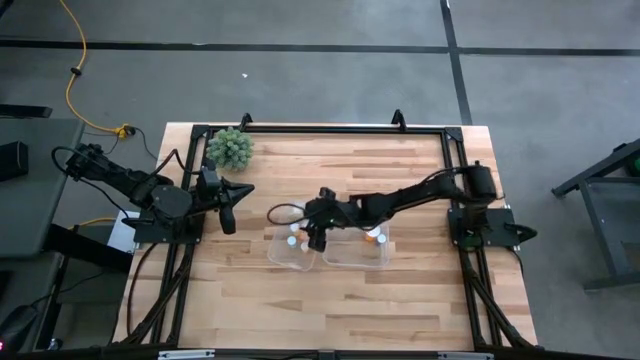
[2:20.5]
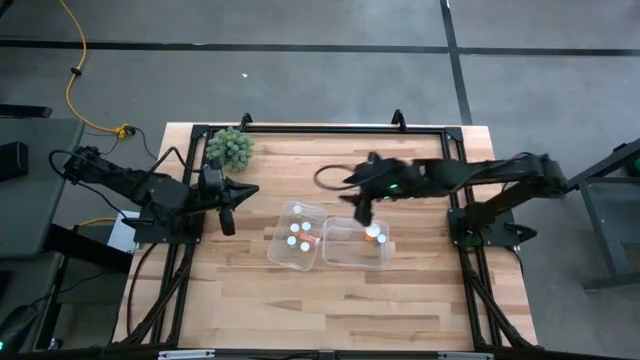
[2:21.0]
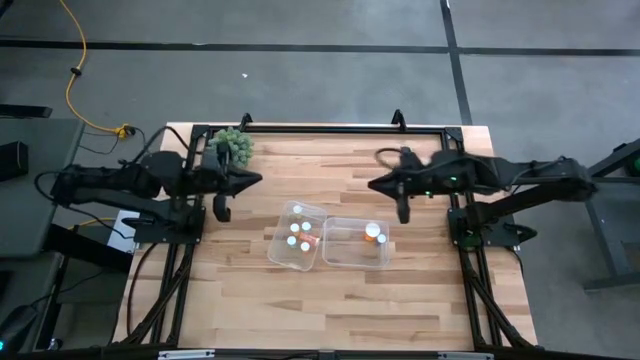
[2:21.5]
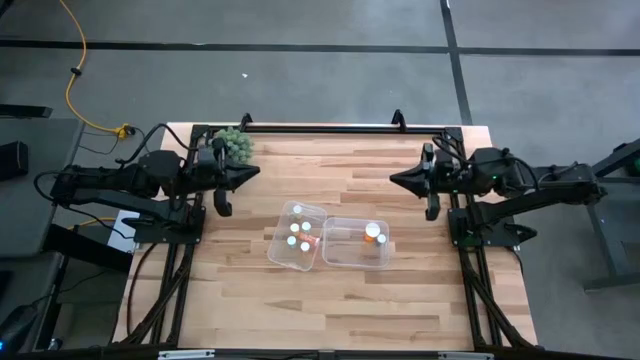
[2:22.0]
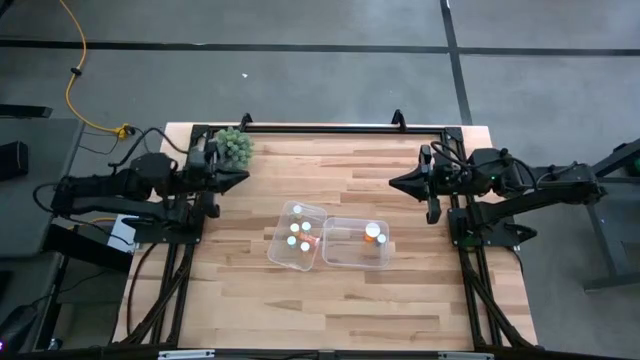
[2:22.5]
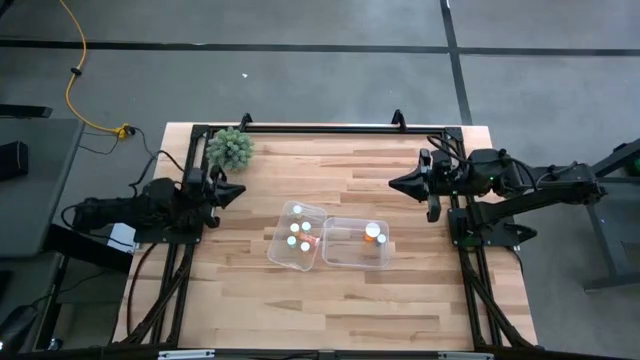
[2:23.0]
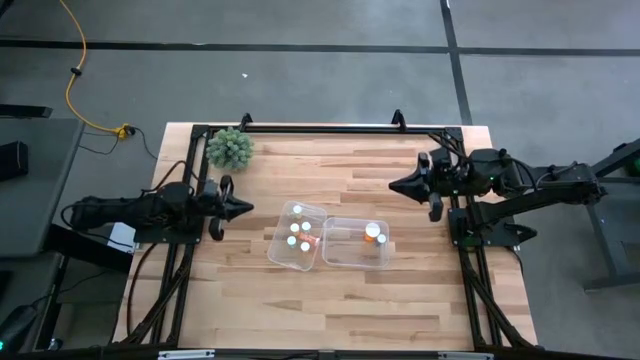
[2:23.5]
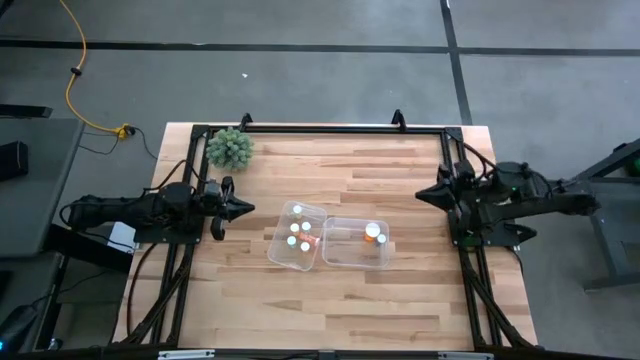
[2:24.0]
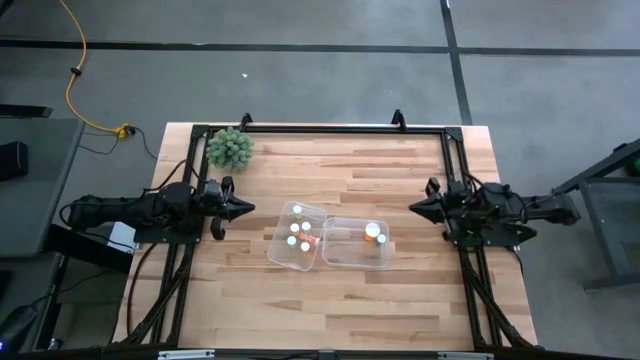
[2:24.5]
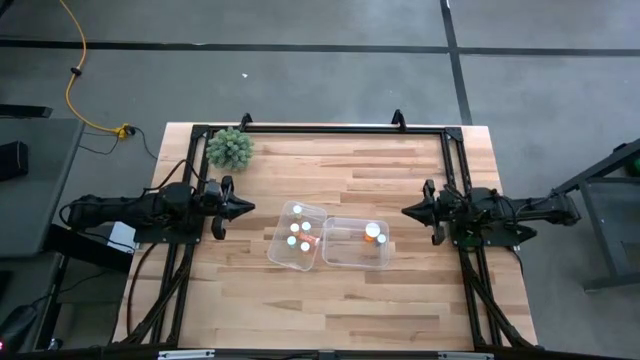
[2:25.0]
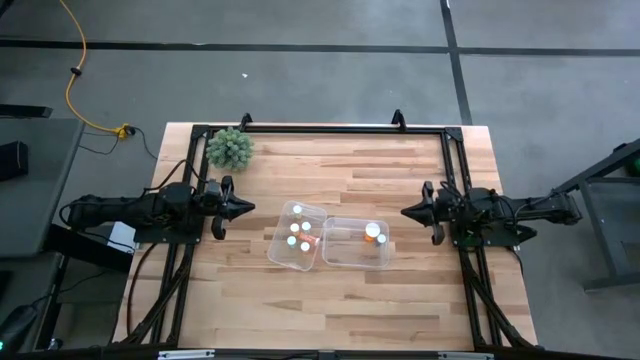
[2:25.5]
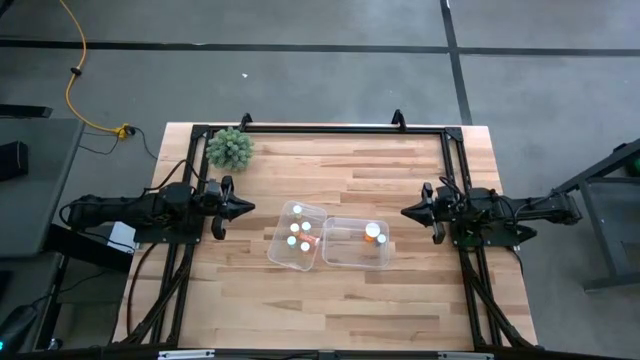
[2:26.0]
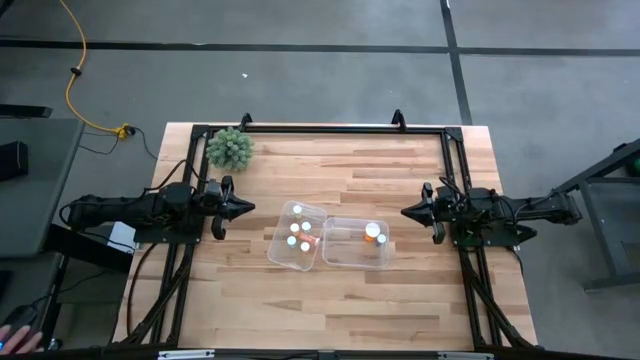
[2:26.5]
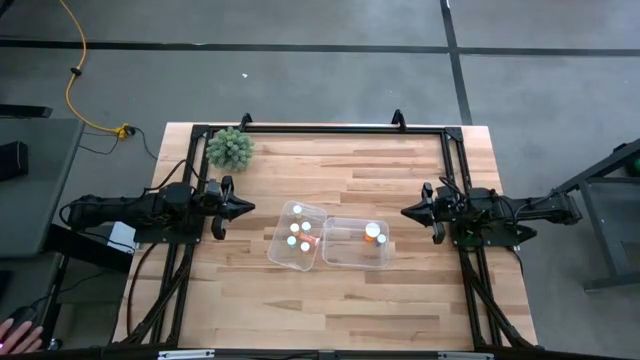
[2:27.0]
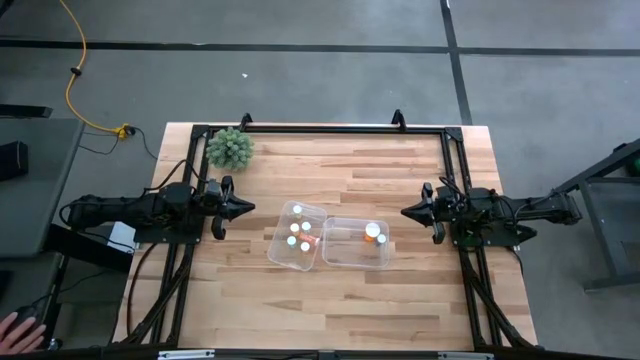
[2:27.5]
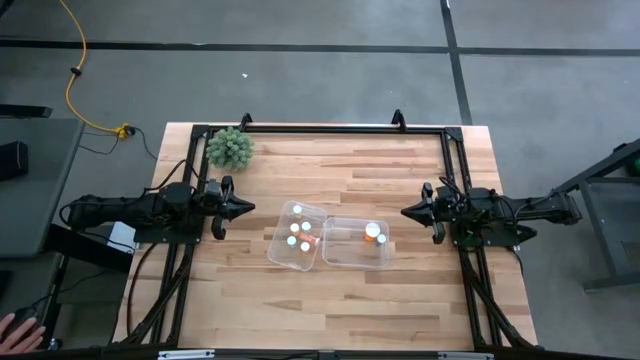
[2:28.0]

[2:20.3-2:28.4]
Task: Pick and place medicine bottles into bin by pill shape (circle, oval)
Return to Home Position

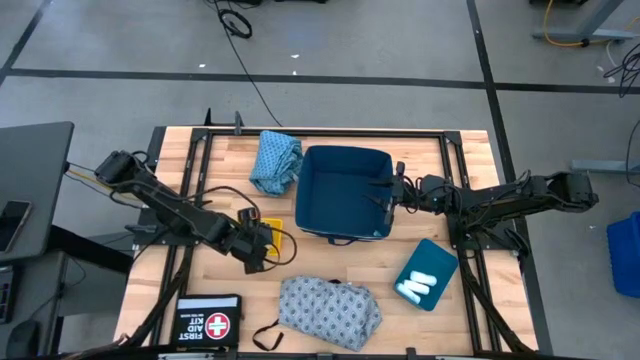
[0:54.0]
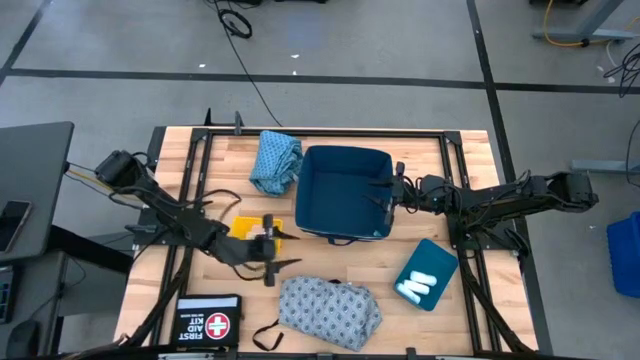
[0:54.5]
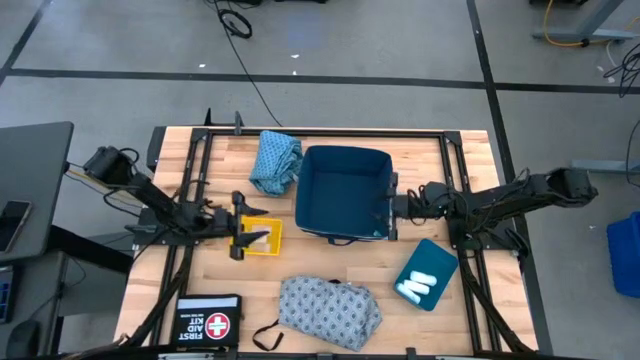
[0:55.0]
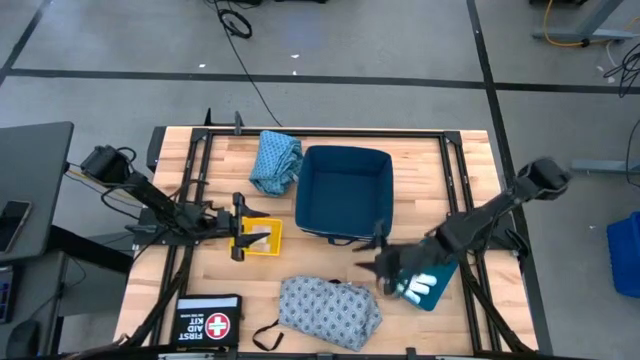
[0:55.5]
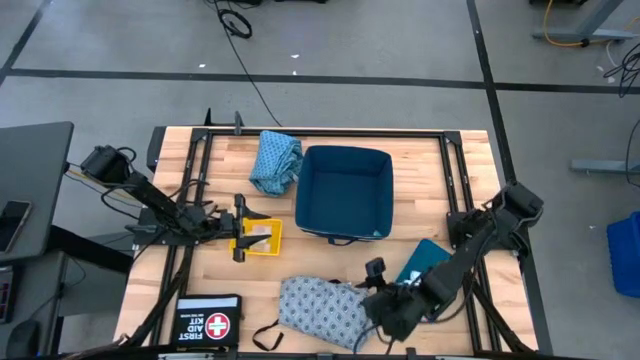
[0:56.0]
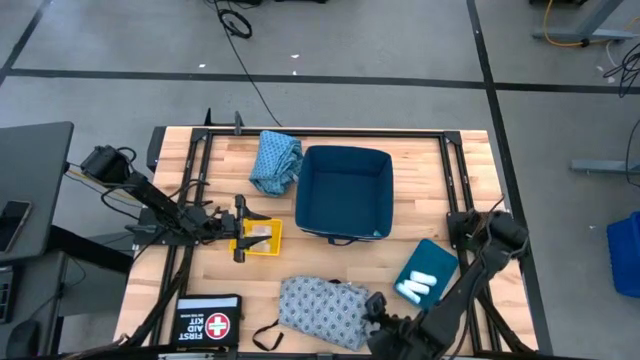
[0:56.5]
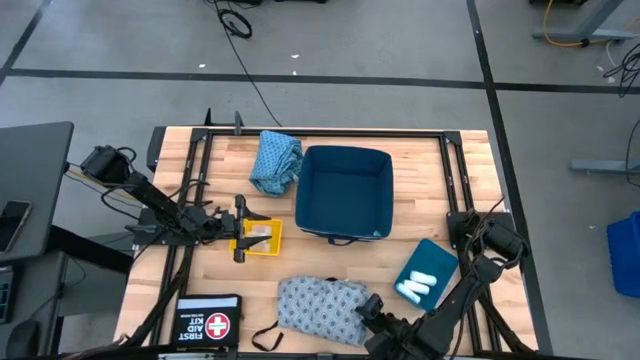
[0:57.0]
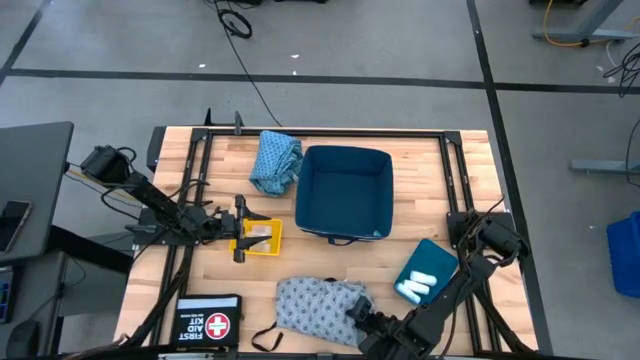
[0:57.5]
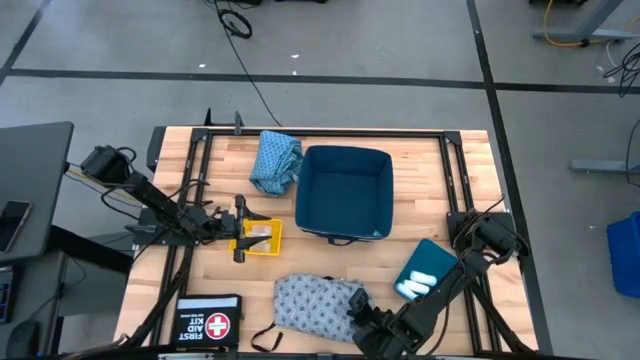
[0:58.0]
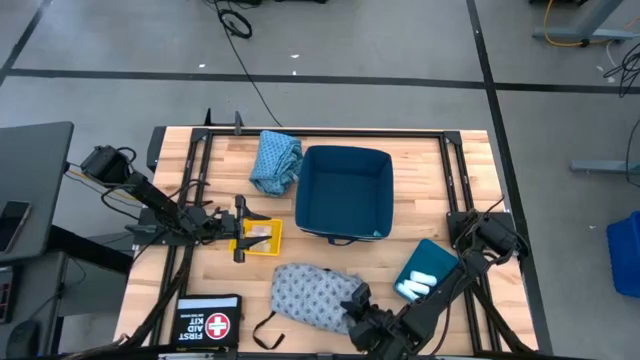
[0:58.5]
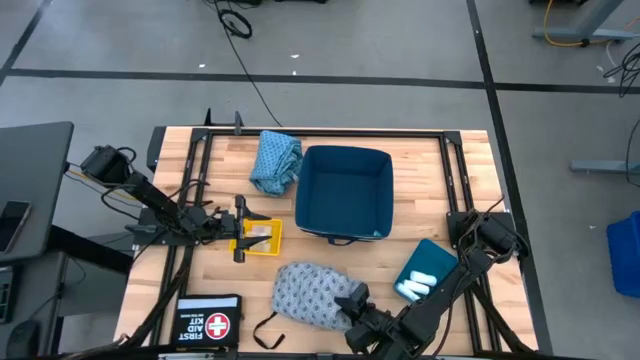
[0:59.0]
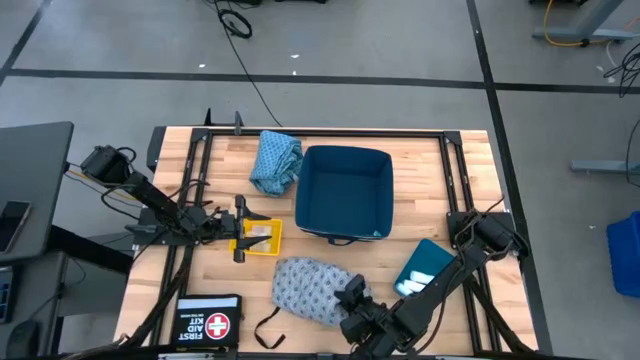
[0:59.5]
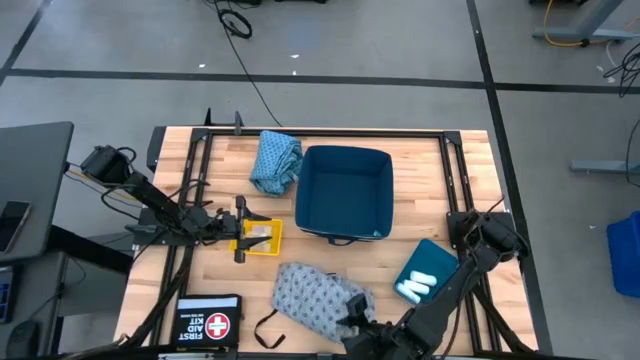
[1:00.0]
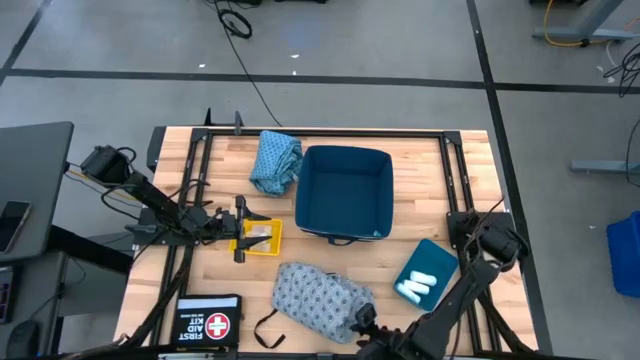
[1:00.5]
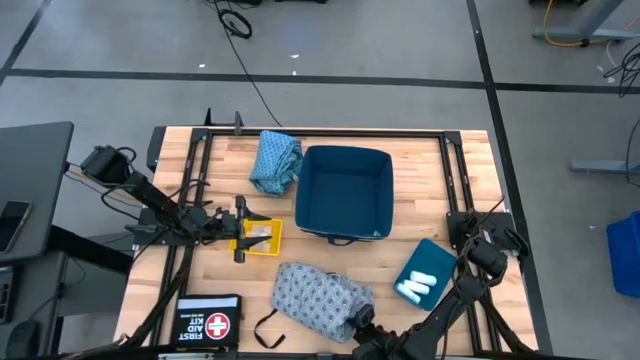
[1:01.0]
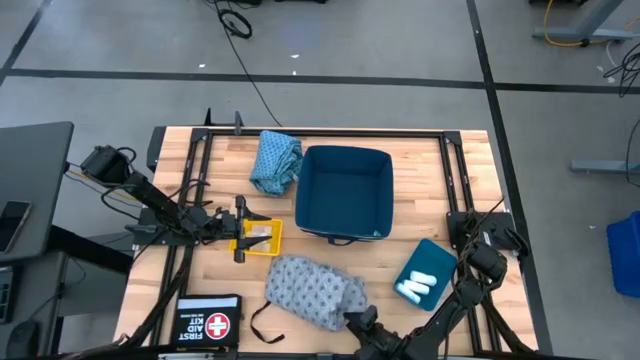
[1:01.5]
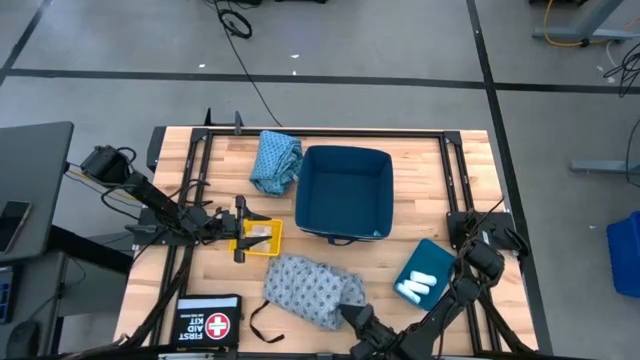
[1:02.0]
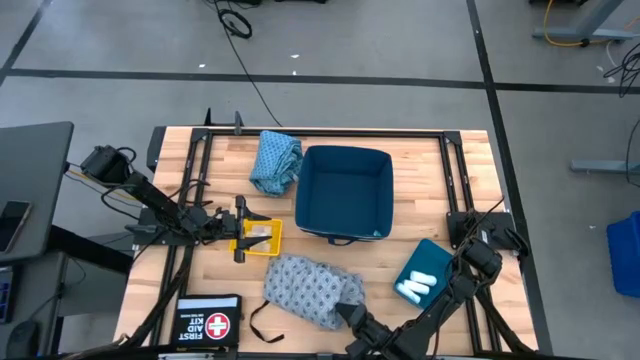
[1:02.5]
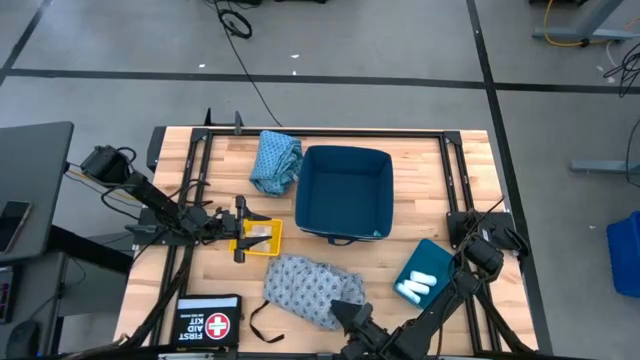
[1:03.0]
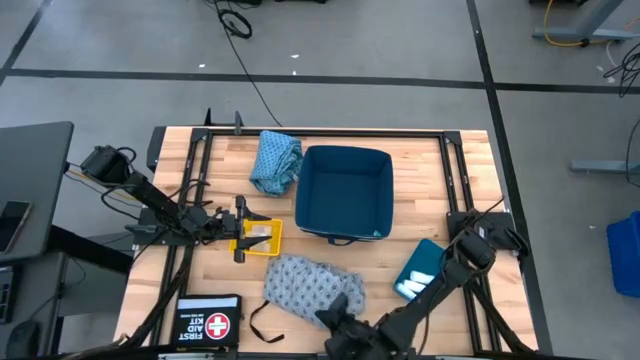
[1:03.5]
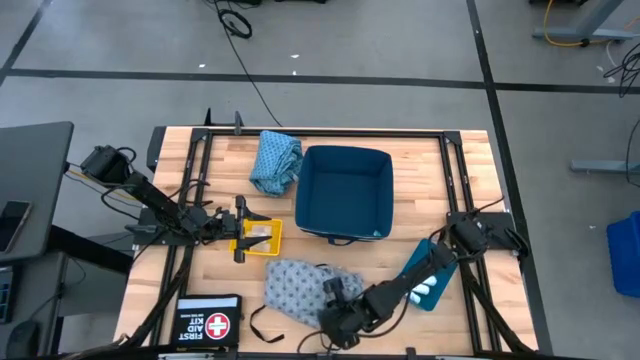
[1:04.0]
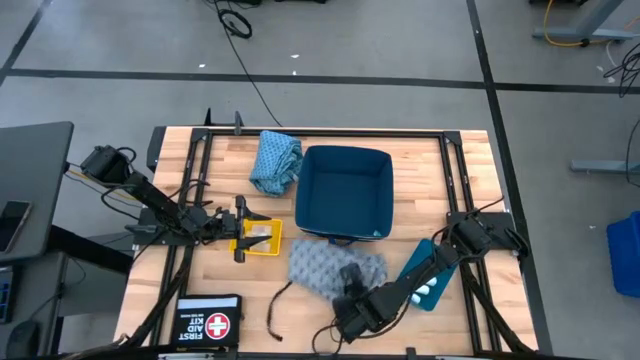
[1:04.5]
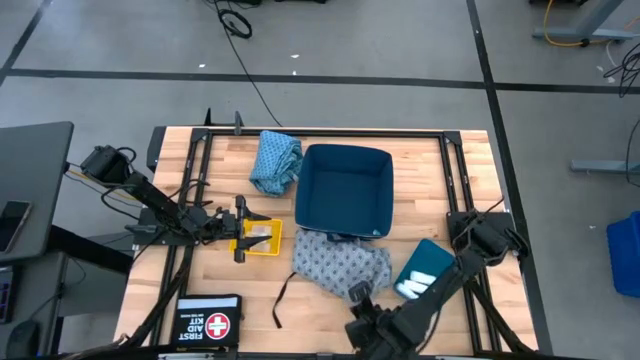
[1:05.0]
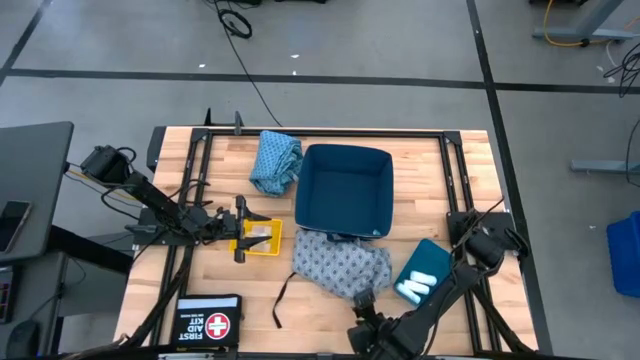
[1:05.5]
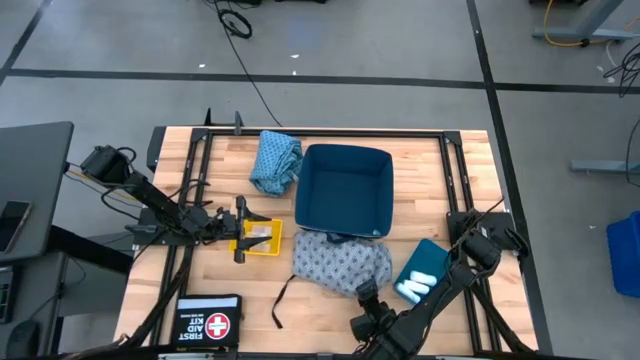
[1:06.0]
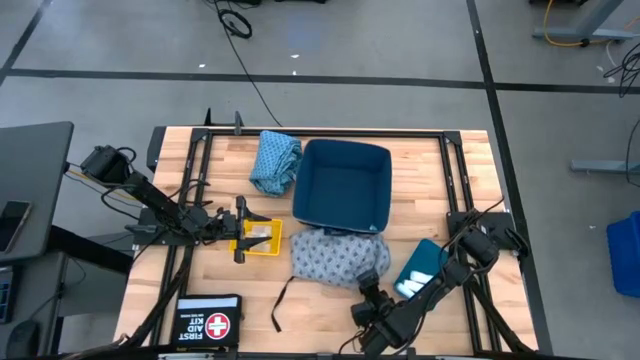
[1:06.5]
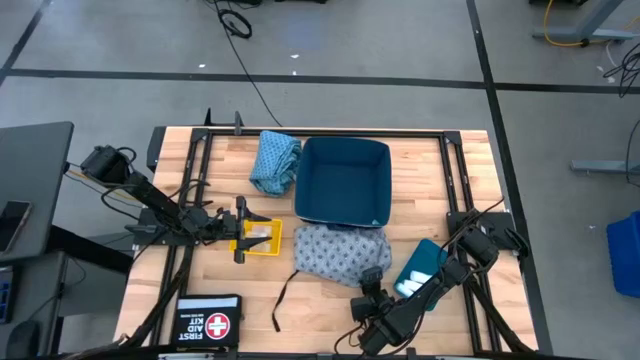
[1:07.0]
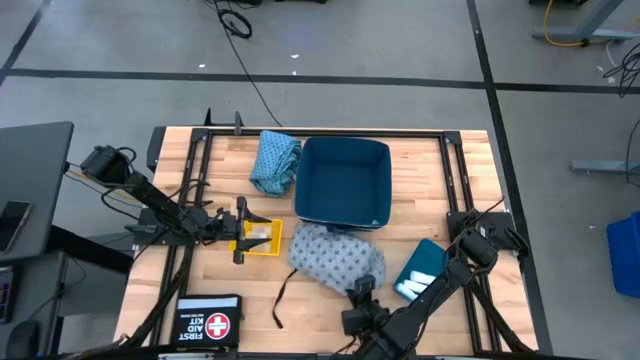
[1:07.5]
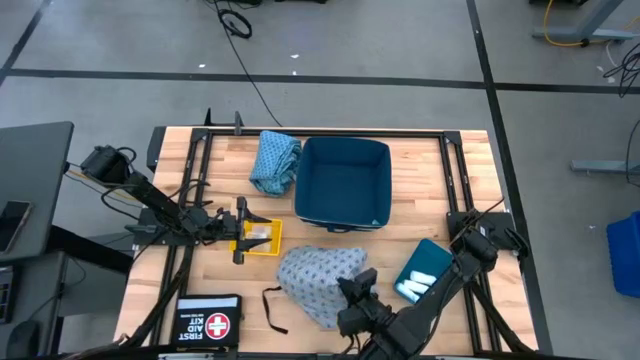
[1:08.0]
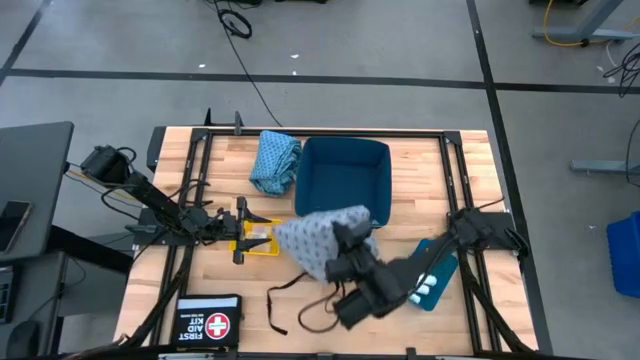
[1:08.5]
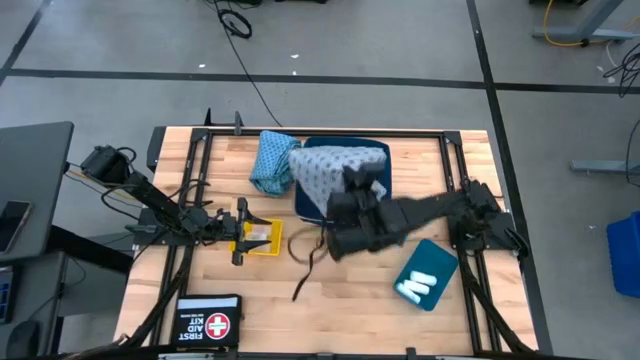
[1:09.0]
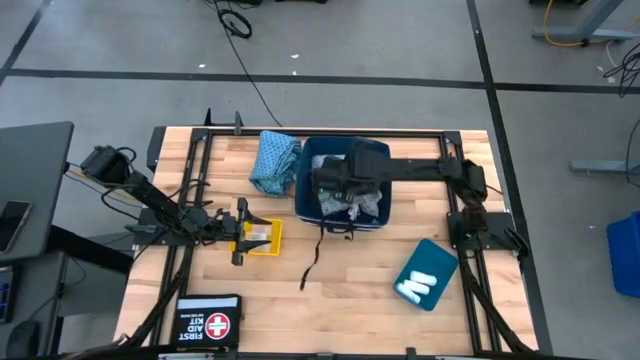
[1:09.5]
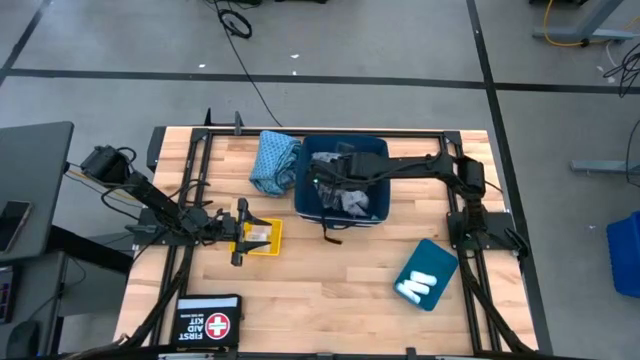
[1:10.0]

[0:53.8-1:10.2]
Task: Pick & place medical supplies in basket/bin
Put the gray gown into the dark blue bin
